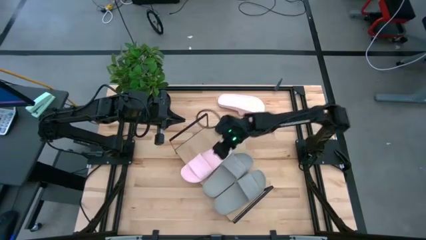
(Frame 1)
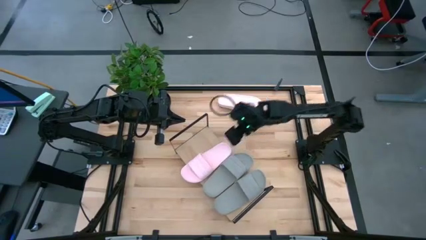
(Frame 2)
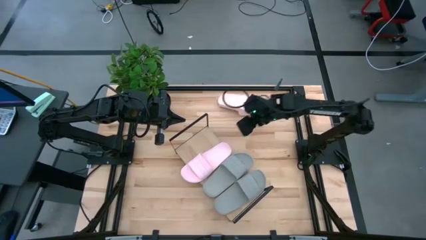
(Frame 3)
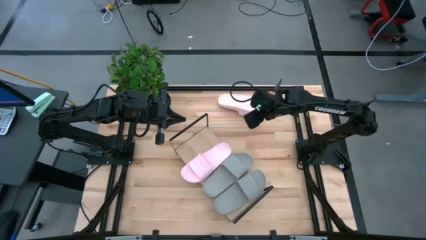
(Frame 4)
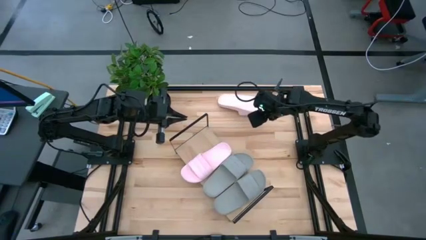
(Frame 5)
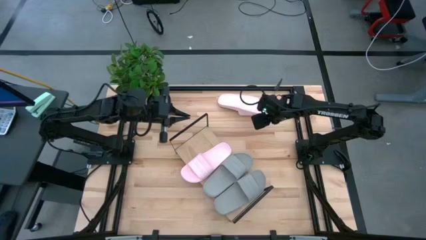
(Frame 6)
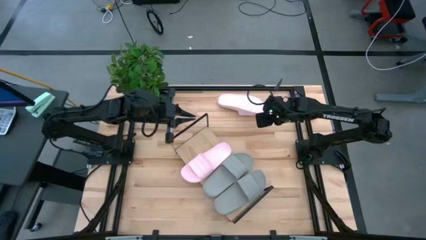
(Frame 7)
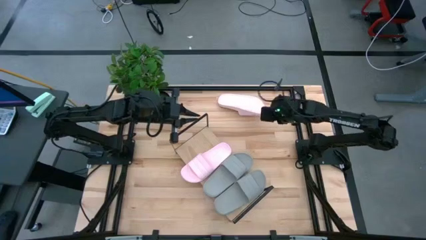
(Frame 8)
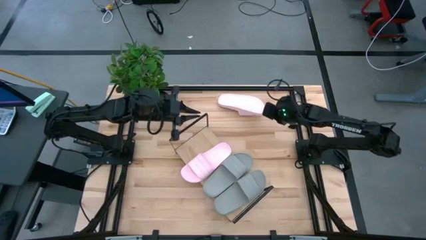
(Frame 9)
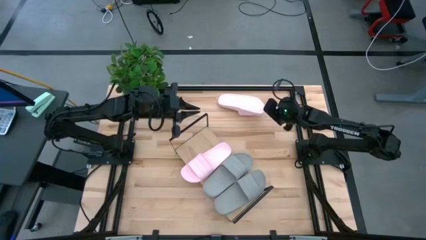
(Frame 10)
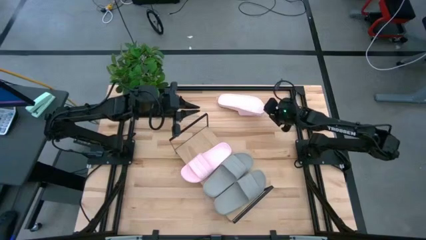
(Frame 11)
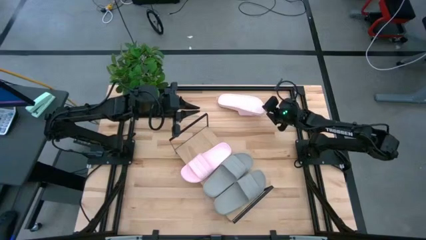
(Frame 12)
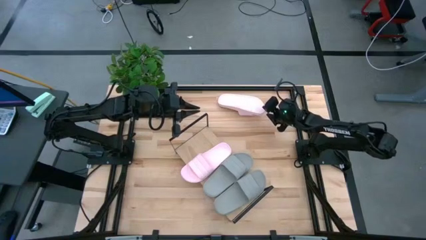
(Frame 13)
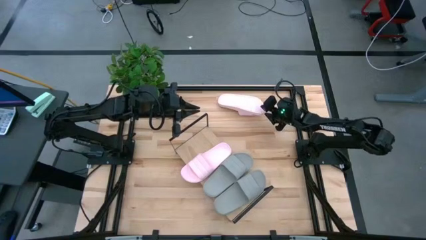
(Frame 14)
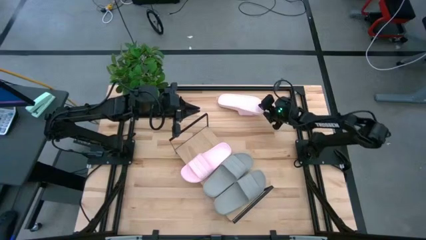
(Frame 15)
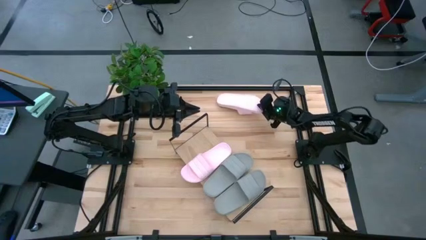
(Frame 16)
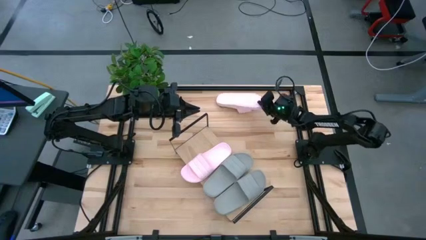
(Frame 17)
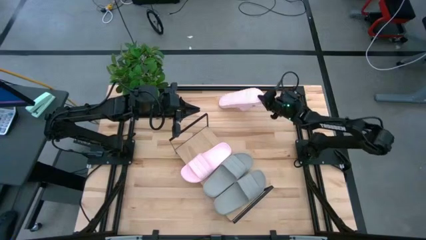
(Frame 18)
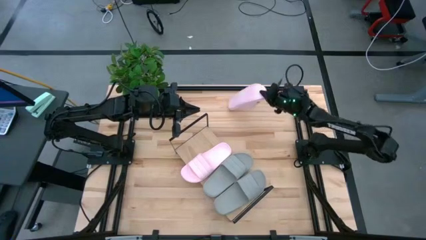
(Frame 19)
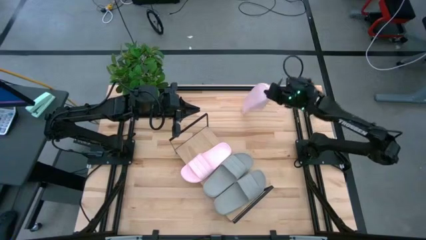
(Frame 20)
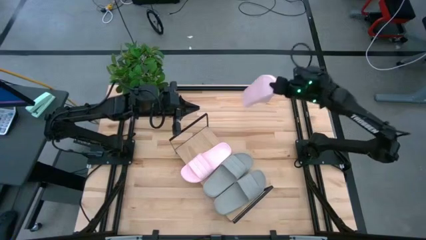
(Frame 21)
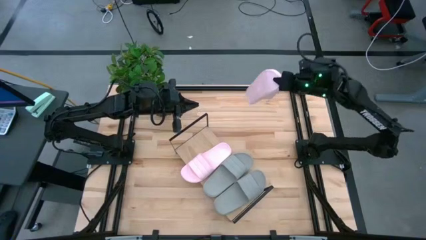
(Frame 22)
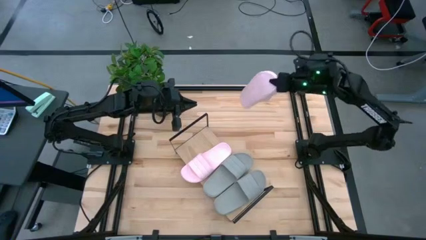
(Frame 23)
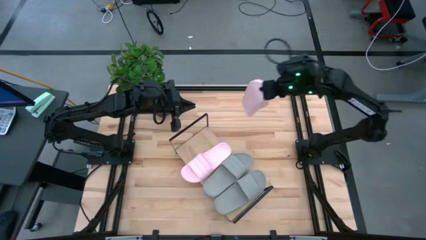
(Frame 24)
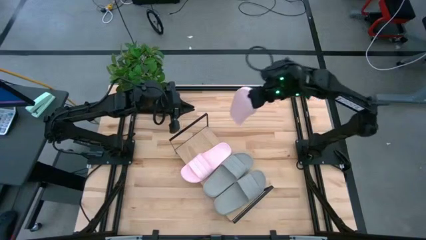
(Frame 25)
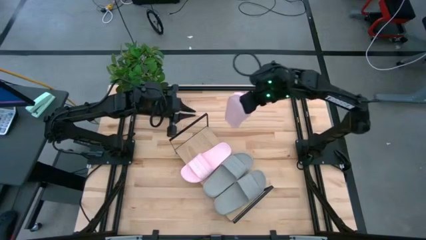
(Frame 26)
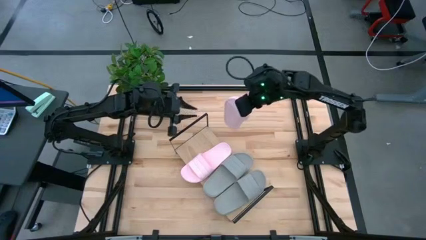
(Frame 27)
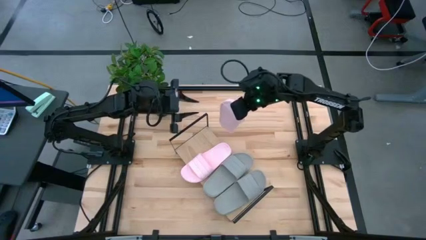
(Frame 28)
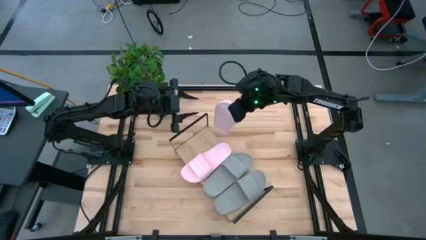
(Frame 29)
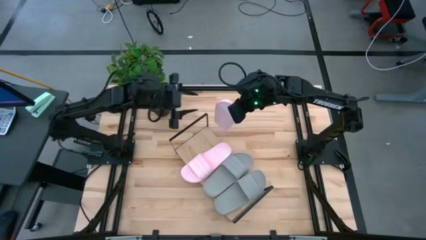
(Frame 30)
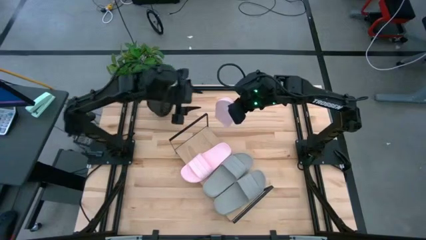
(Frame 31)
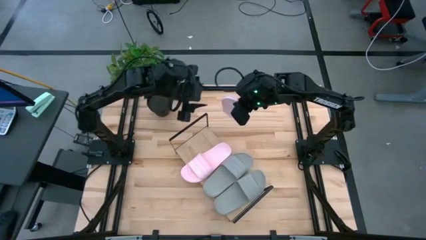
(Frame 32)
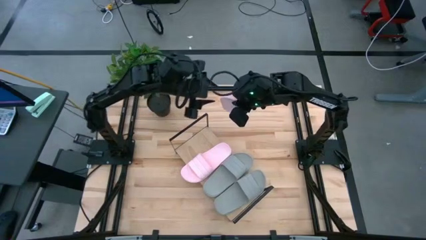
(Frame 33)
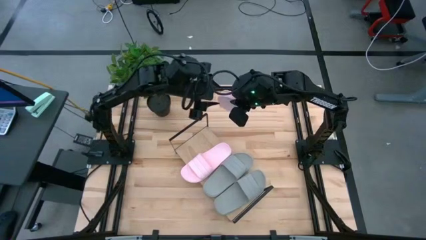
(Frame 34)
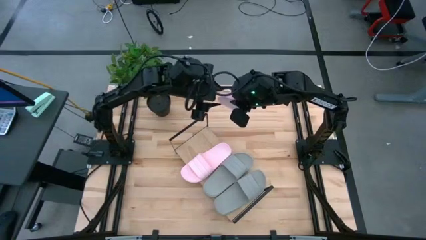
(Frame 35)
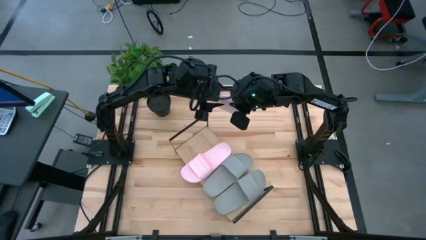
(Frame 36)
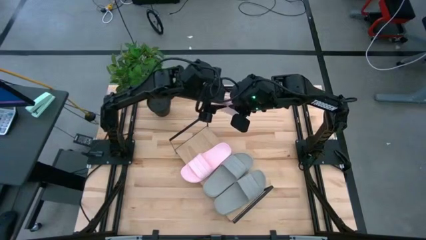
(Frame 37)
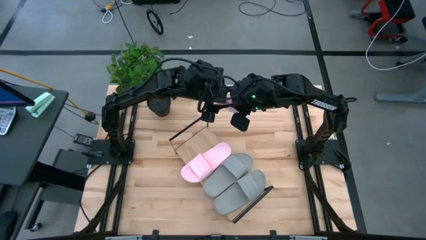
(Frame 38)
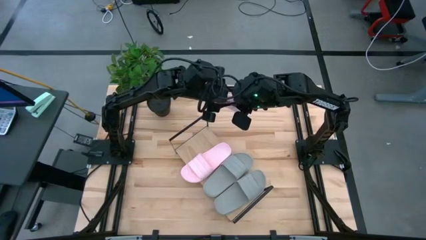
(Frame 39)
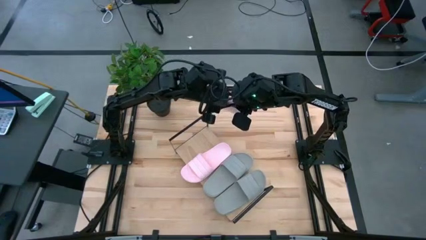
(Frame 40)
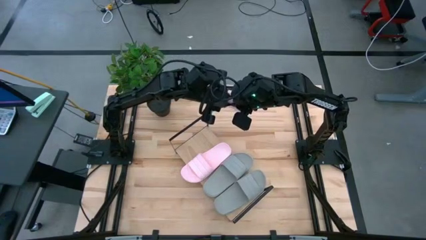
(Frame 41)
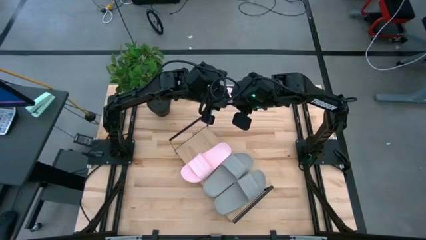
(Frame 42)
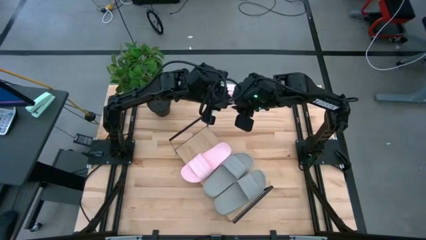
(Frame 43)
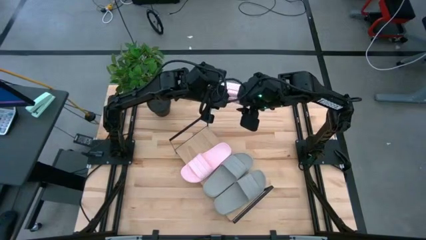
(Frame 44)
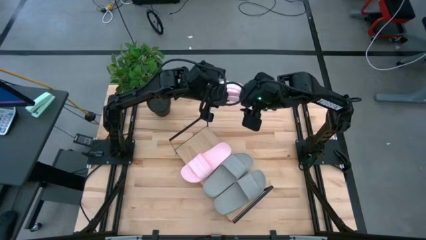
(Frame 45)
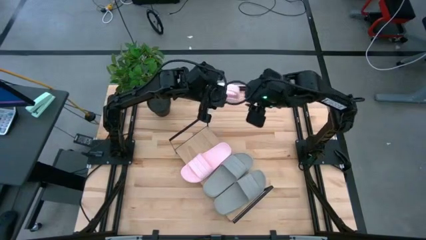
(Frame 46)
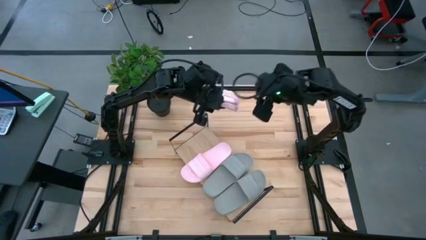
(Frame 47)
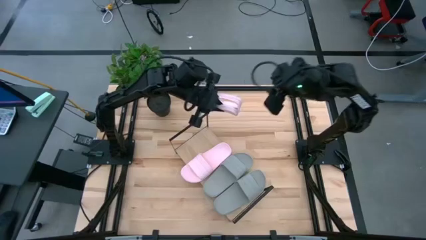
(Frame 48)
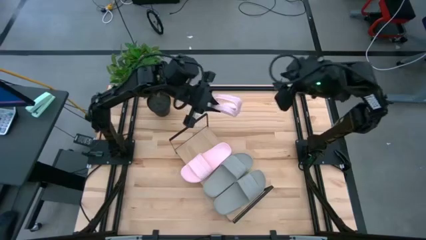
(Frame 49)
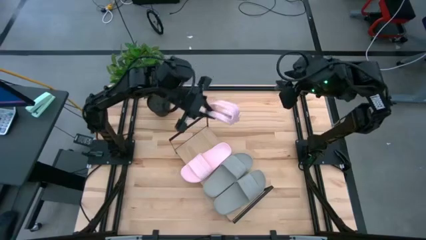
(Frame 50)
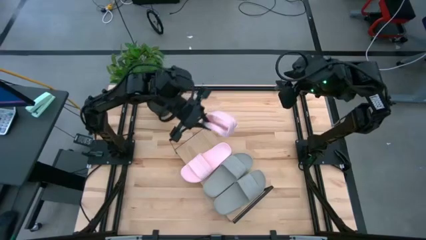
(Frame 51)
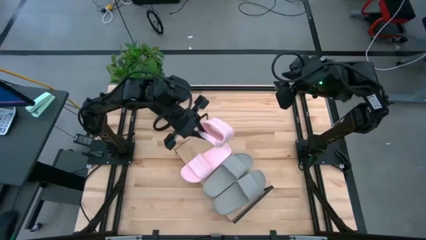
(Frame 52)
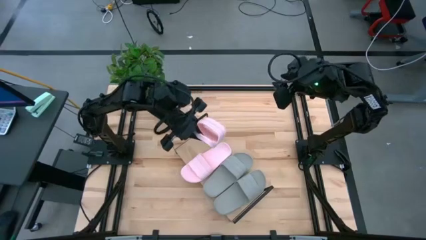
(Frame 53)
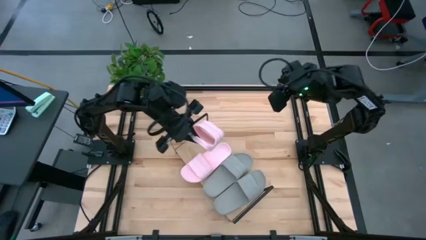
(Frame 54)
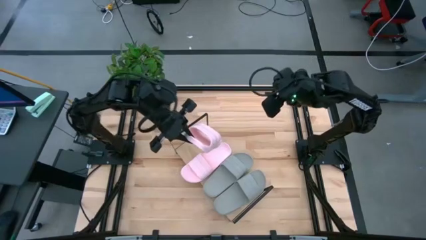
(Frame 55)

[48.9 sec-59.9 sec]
Task: Pick and place slides into the shelf
Put the pink slide on the shelf

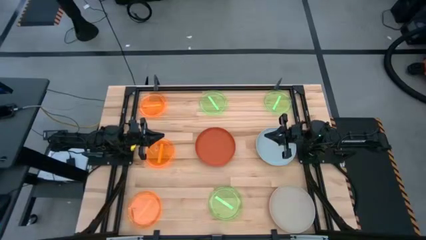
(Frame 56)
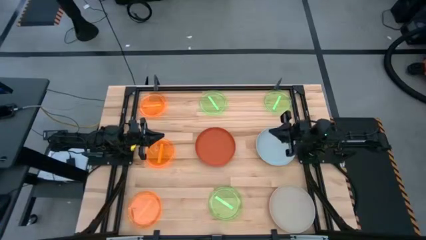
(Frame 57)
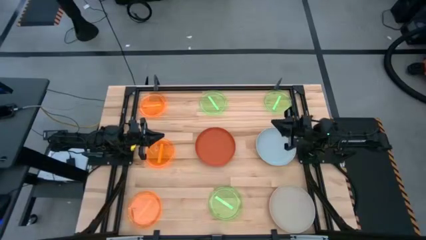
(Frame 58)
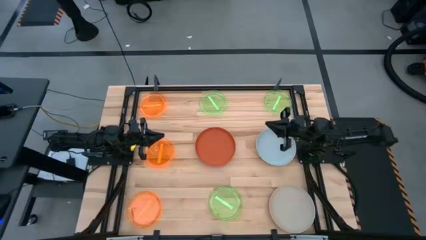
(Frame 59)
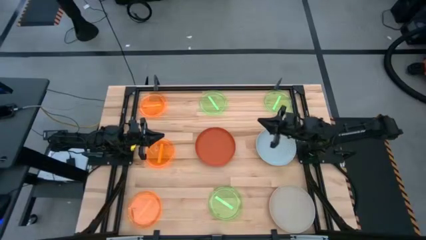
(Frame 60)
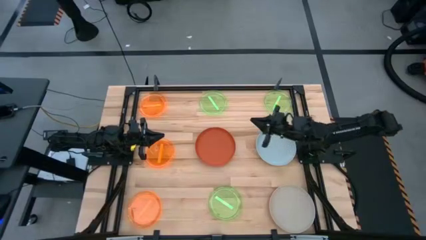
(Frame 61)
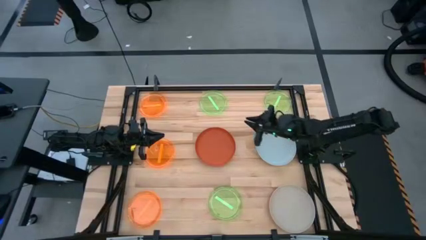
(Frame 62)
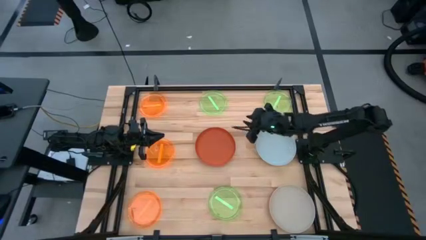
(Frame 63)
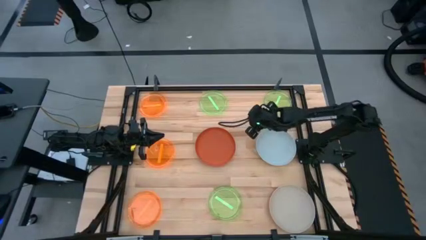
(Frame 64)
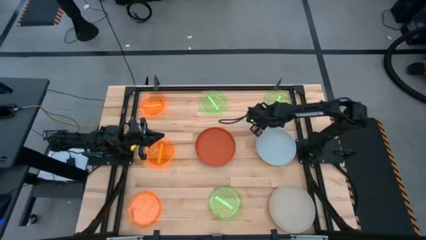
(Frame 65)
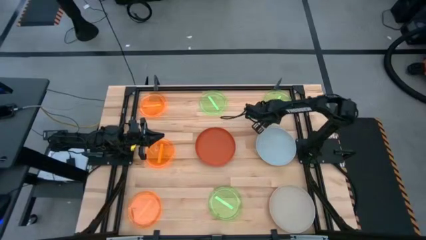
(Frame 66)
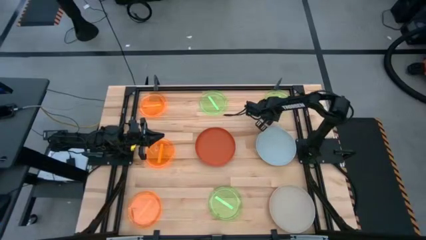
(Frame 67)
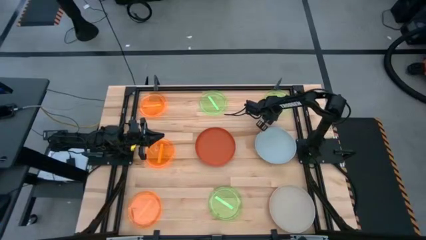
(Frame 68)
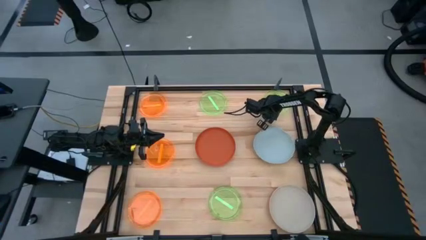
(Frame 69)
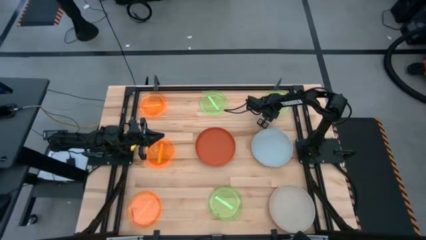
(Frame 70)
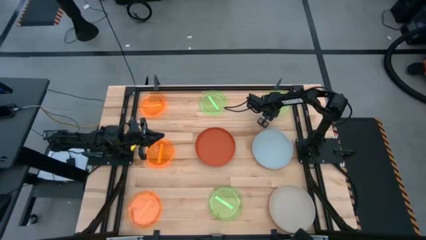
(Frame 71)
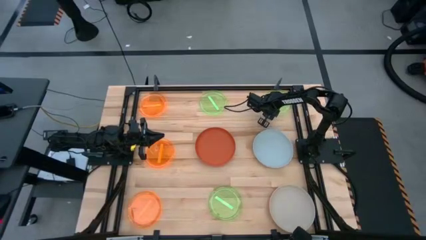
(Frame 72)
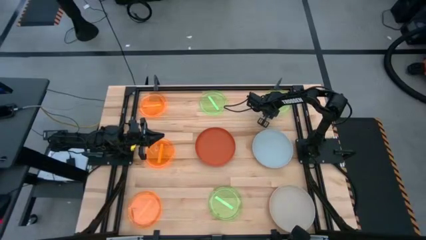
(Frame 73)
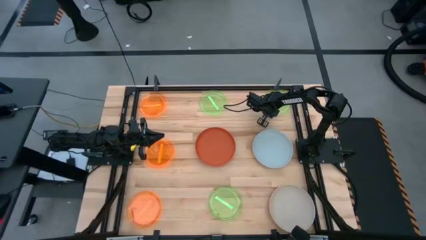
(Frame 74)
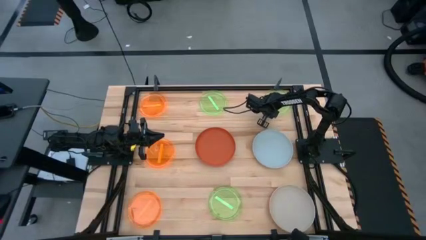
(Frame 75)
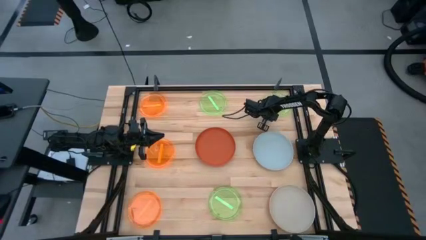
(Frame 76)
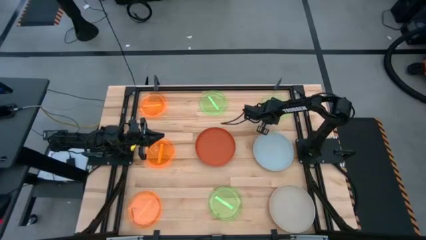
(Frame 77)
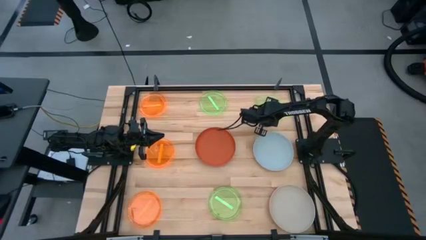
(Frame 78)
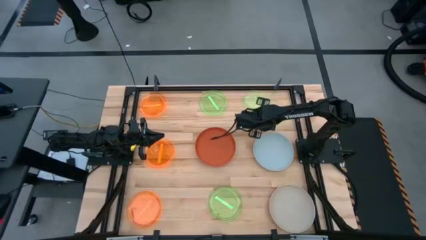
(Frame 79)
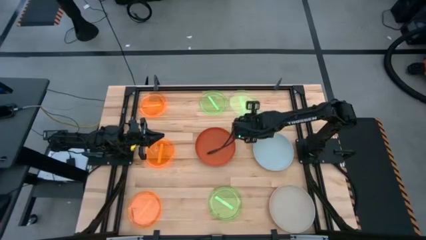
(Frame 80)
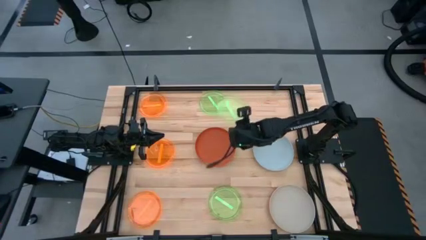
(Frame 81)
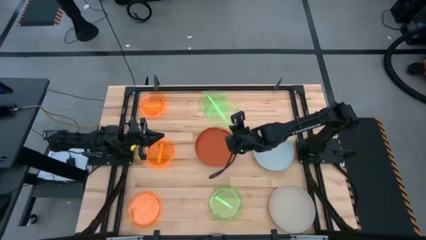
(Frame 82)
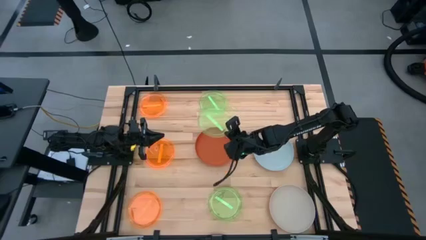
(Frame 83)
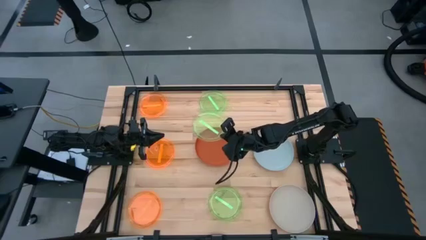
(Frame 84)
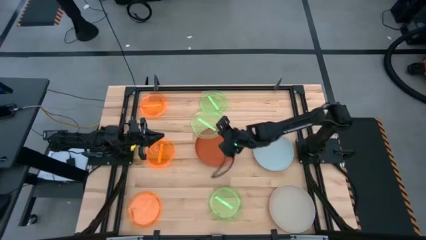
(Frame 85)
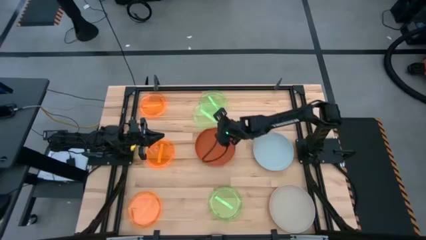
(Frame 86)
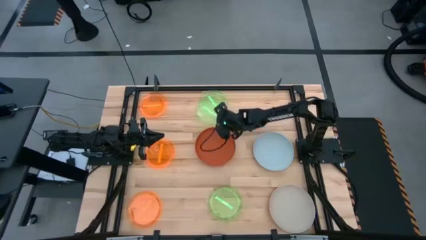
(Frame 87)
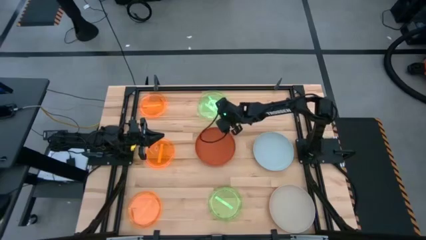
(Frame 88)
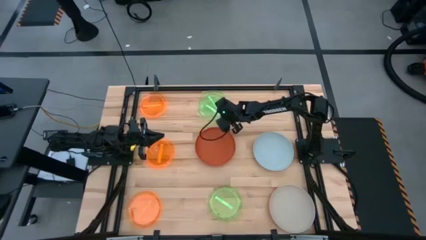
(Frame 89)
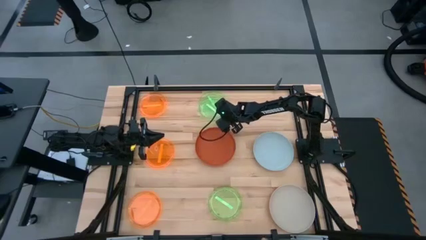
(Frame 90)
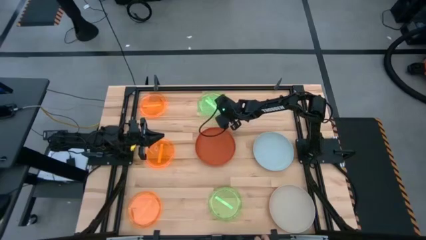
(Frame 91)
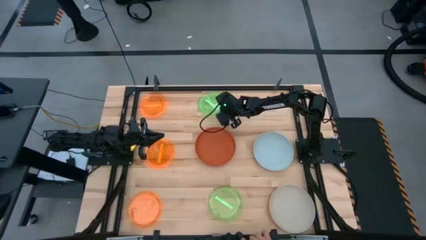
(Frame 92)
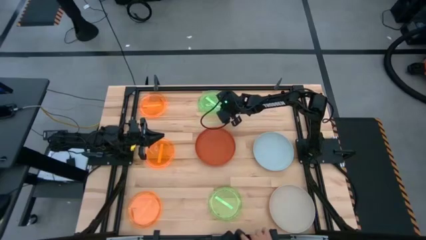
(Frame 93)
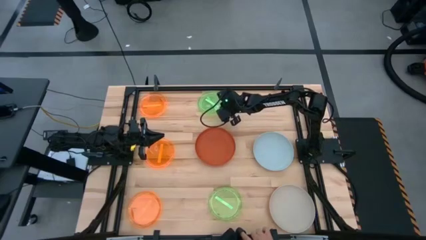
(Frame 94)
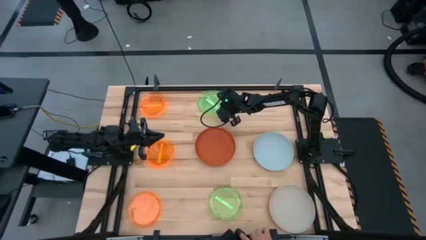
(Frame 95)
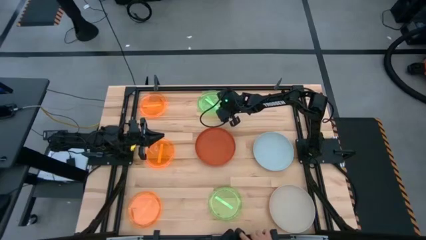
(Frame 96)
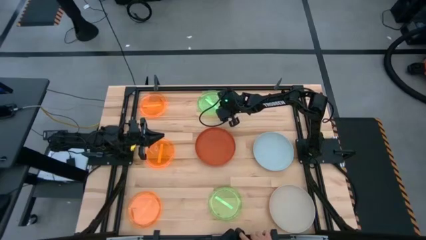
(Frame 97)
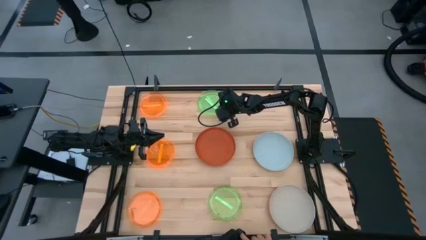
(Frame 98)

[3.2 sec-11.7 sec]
Task: Stack plastic plates
Stack the top right green plate on top of the top green plate
